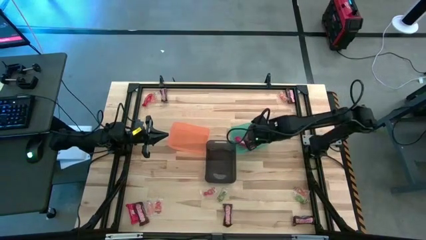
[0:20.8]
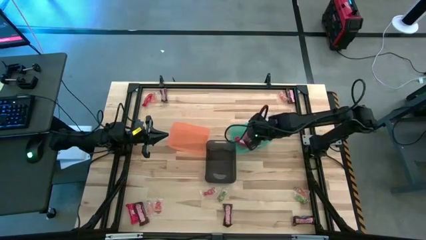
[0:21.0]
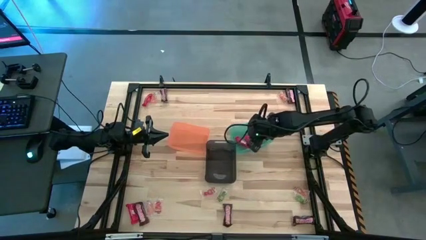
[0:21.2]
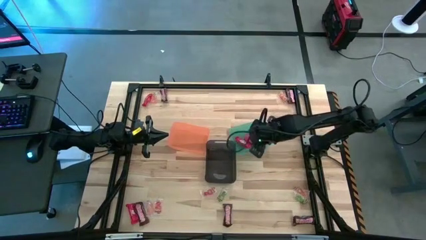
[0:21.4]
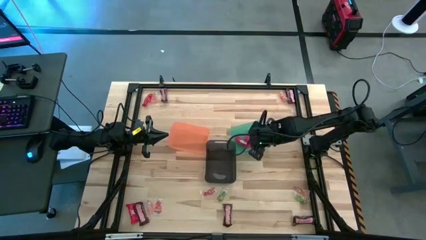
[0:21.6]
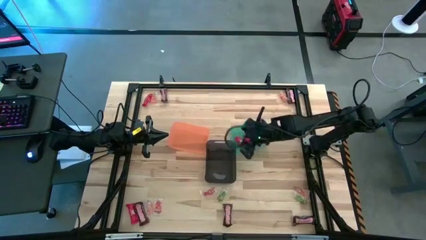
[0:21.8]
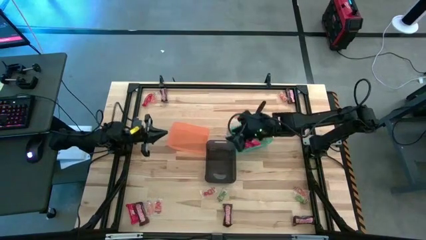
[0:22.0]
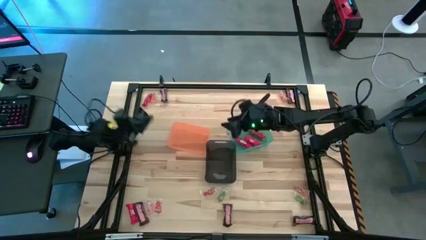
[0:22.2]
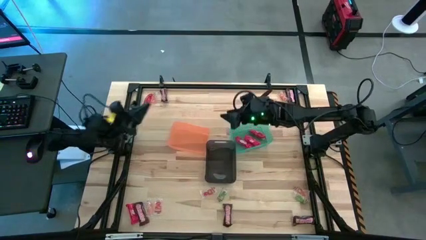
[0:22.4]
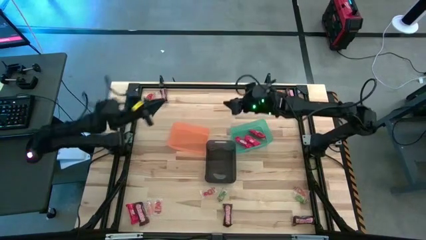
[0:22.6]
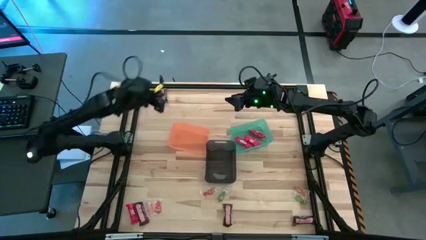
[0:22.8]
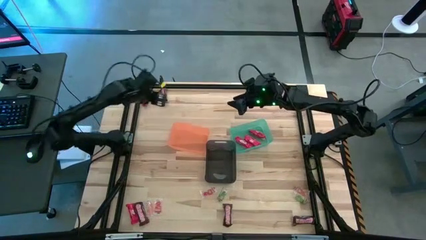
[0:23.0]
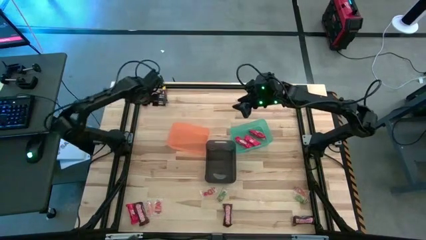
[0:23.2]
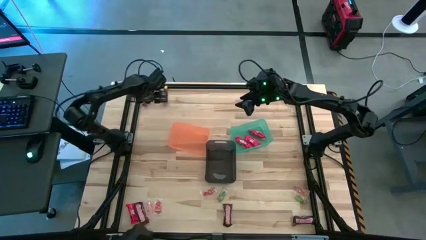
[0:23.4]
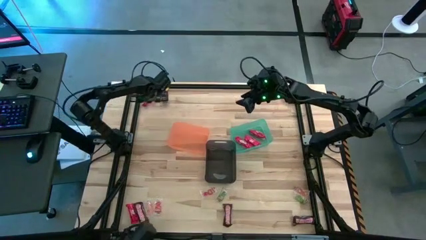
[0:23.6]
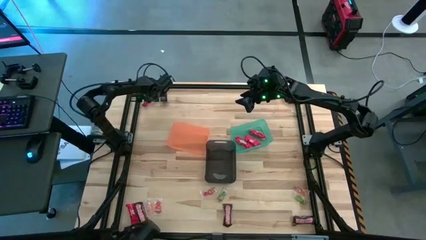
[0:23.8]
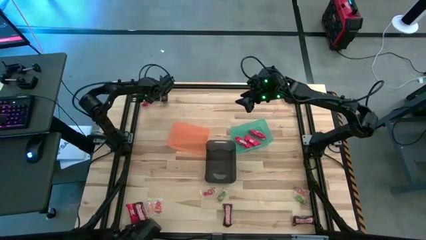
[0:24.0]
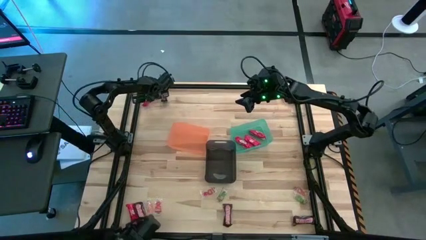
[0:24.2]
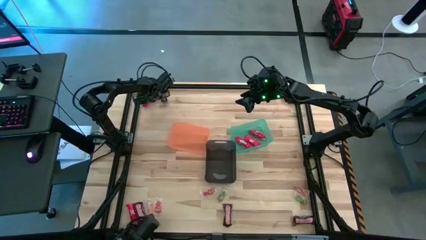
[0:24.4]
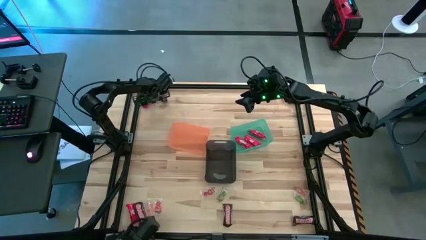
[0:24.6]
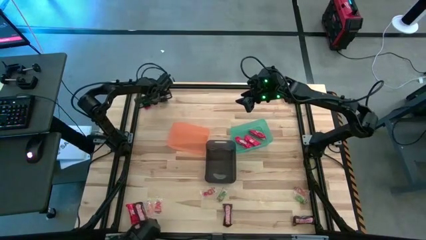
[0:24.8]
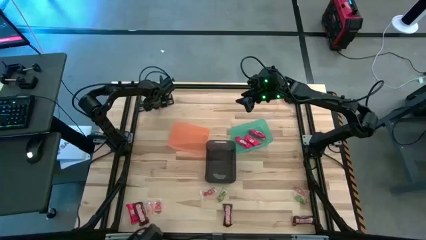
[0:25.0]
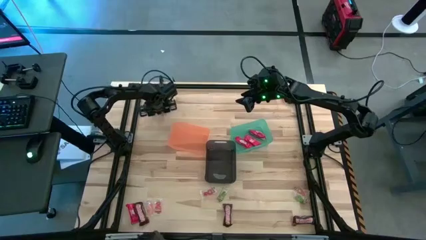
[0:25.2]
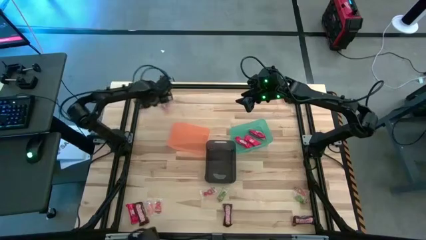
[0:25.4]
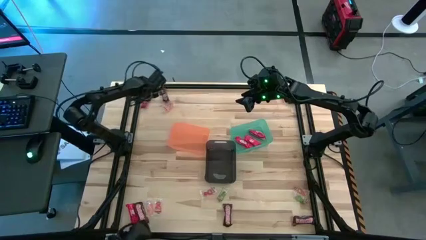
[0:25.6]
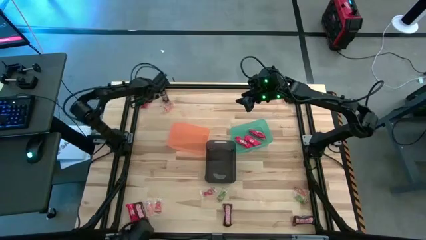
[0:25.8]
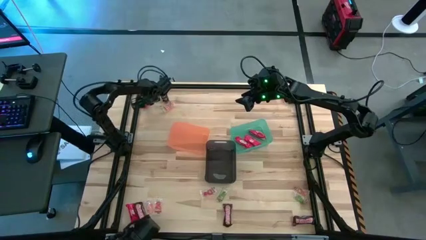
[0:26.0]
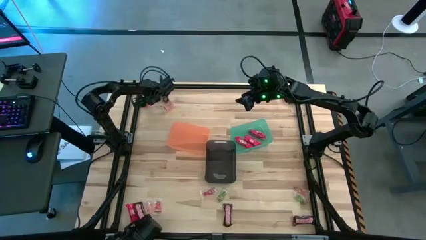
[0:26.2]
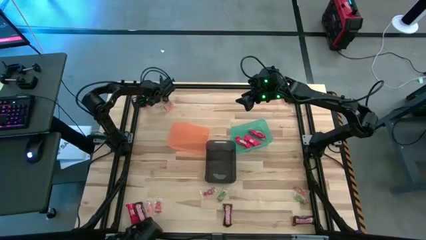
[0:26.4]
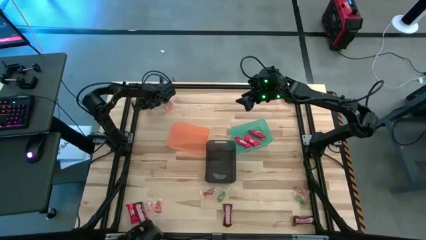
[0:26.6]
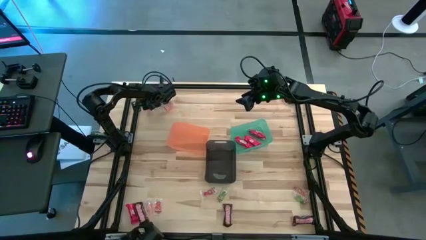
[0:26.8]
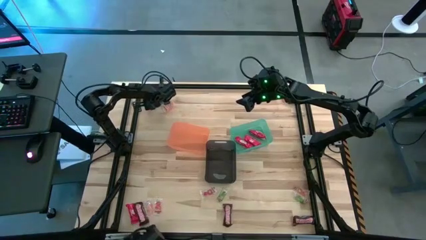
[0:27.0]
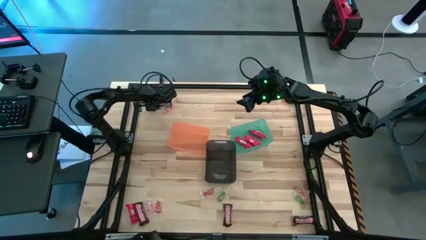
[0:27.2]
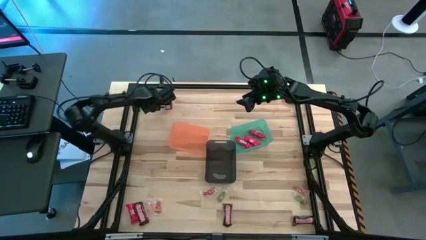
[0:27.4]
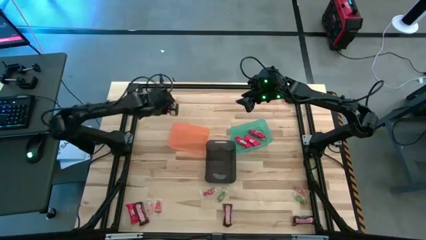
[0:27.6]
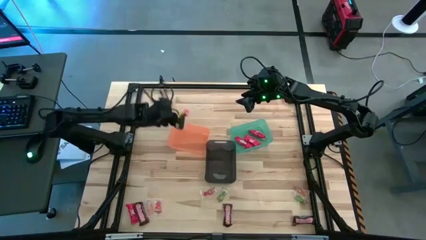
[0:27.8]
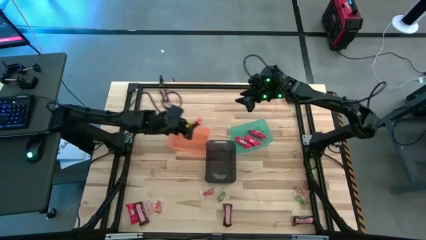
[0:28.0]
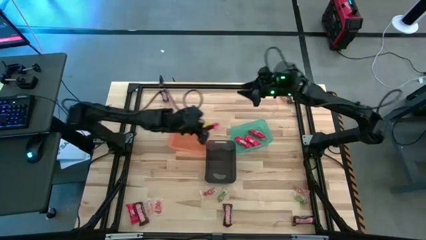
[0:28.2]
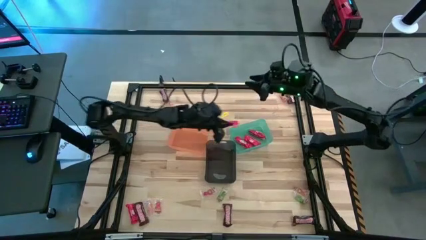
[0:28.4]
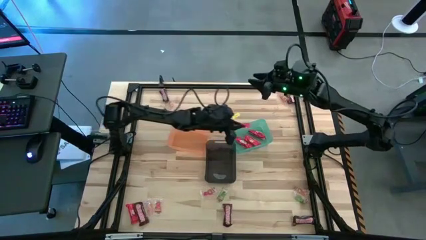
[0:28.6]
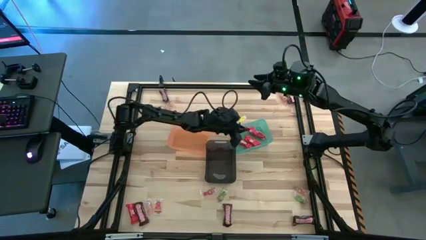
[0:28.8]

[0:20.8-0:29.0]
Task: Sort candy by brand, put in halloween buckets
Put the red chocolate bar into the green bin

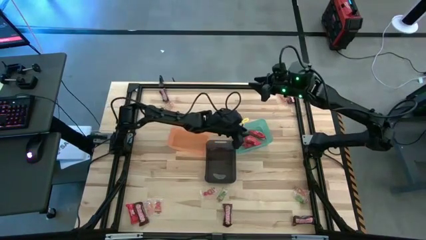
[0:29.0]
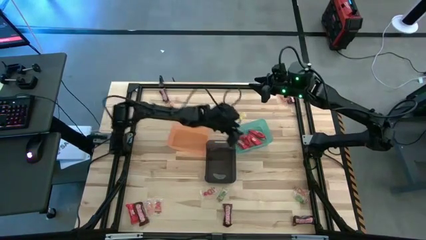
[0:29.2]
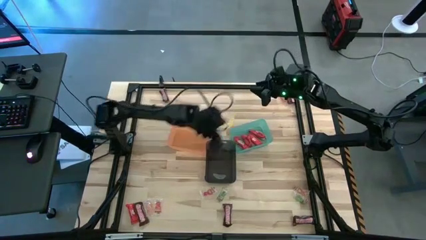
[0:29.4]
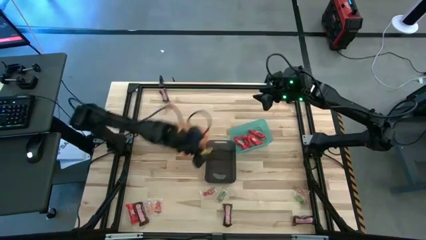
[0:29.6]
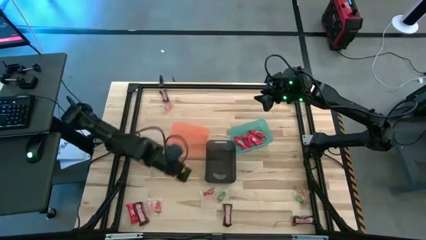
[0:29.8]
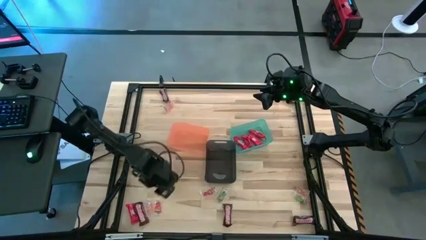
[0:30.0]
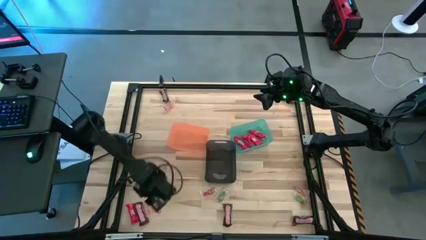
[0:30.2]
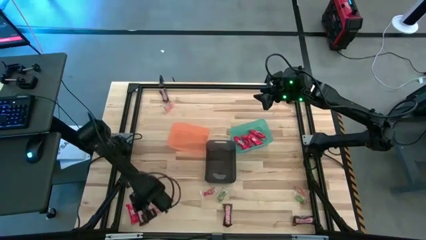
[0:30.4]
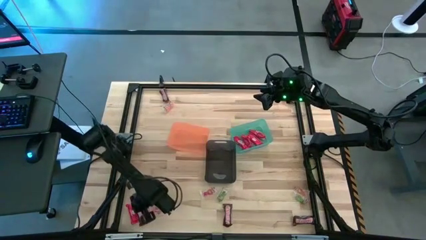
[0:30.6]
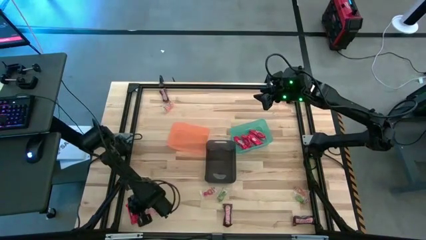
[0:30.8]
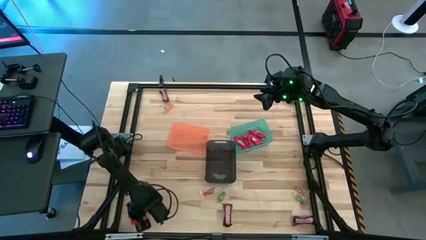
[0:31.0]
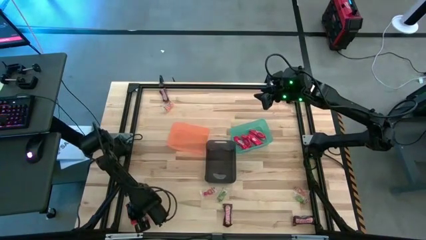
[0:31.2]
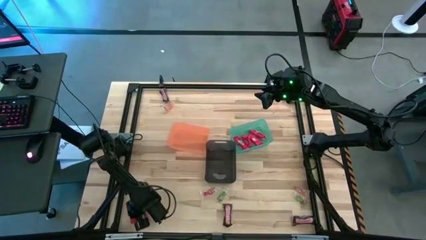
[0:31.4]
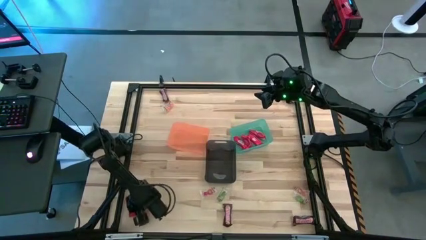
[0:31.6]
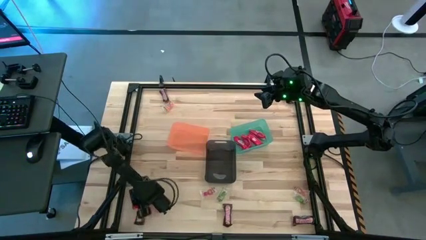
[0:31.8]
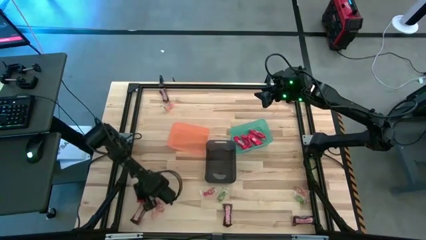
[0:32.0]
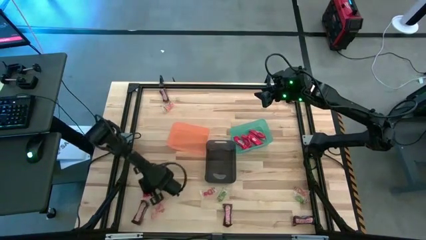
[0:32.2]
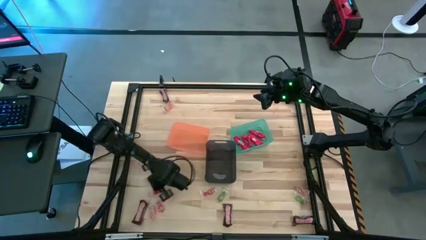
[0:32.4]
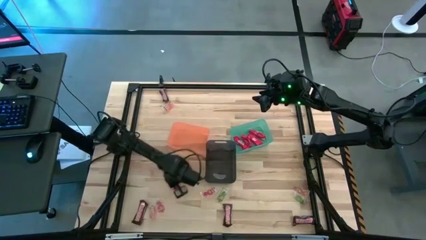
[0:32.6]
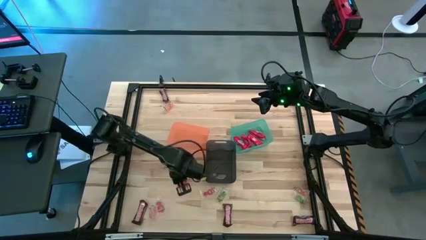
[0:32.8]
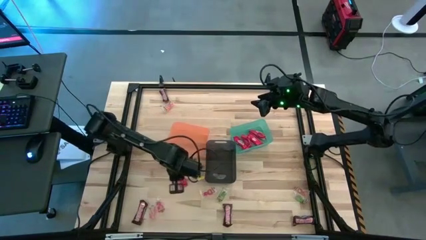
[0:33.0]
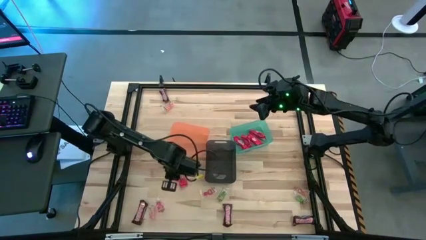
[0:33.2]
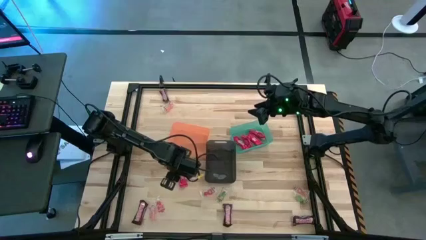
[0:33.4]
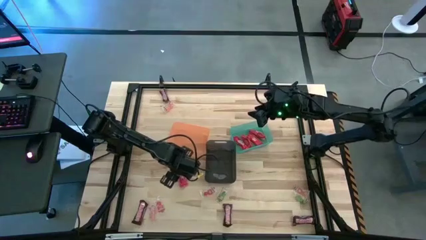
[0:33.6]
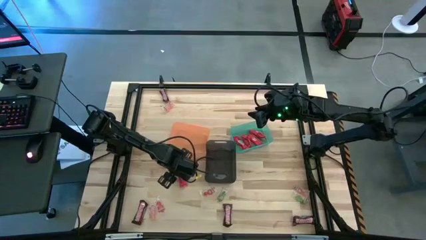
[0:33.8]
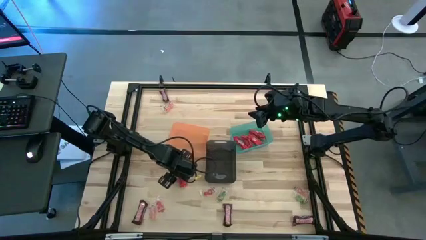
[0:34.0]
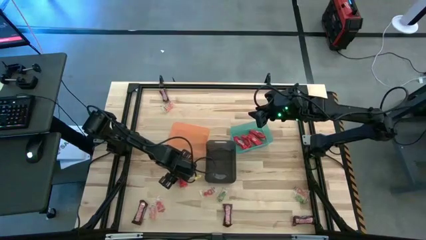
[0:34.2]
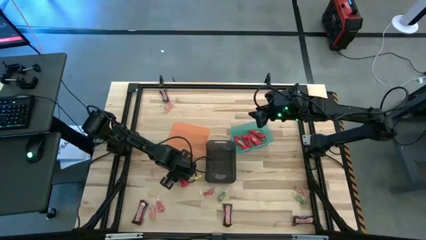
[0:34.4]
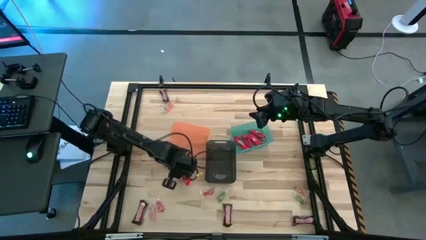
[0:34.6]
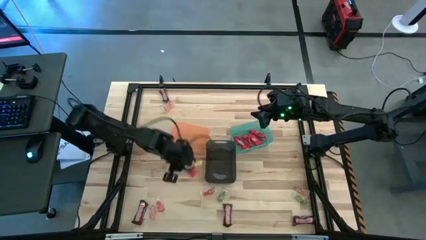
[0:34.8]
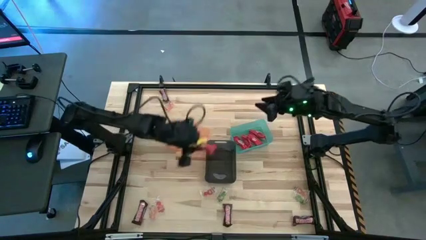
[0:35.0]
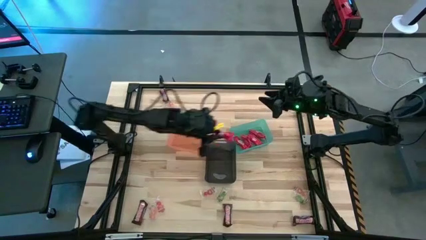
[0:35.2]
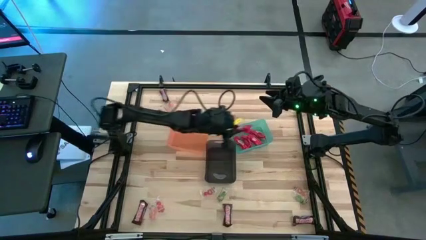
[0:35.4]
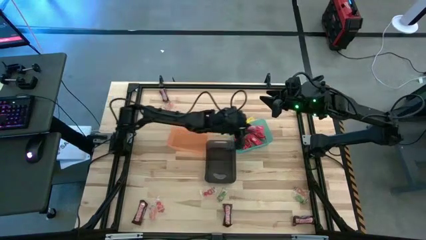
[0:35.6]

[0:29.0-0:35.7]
Put the red chocolate bar into the green bin

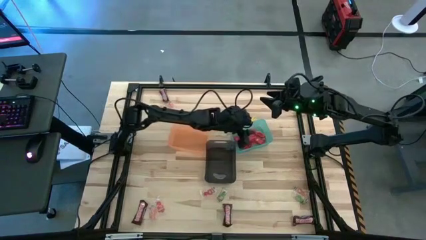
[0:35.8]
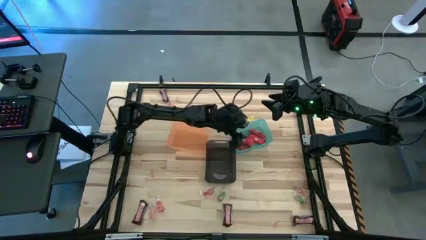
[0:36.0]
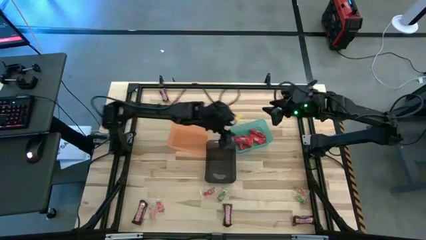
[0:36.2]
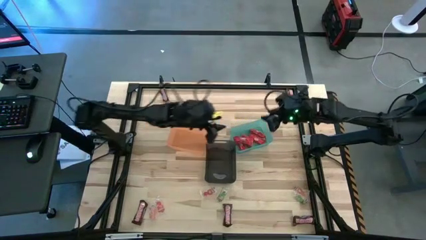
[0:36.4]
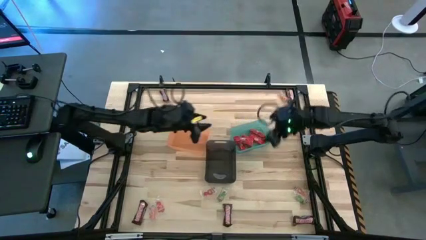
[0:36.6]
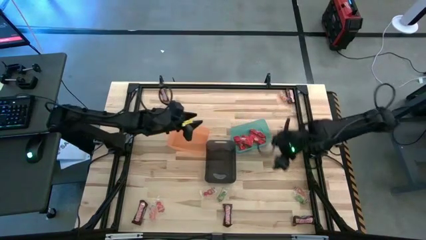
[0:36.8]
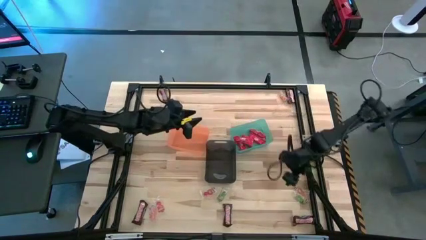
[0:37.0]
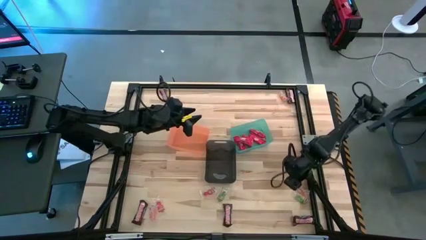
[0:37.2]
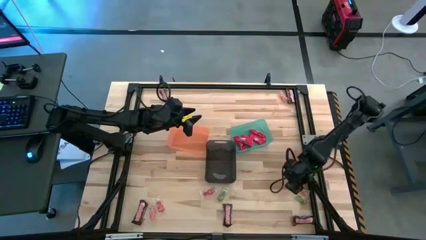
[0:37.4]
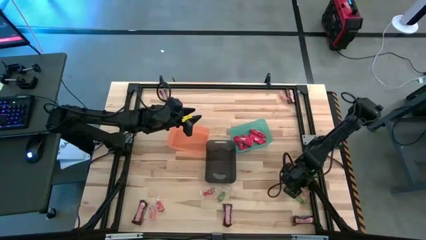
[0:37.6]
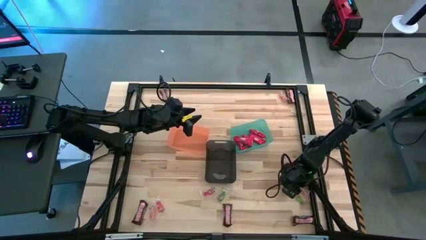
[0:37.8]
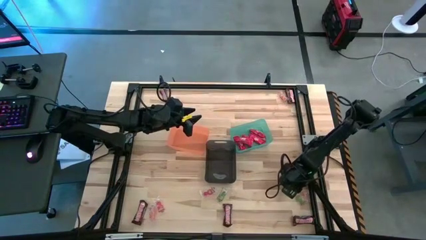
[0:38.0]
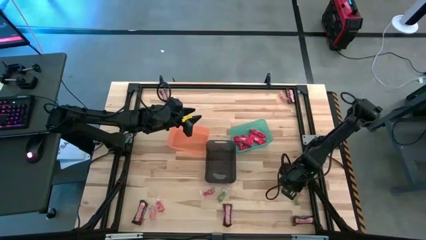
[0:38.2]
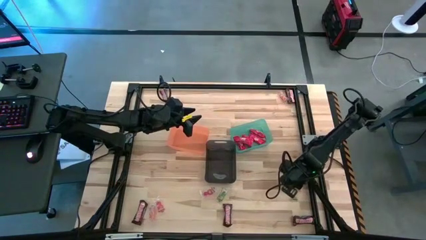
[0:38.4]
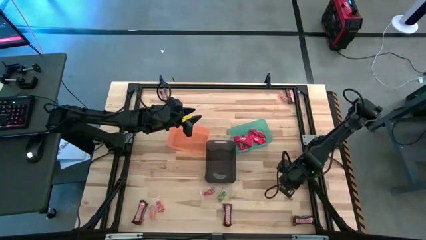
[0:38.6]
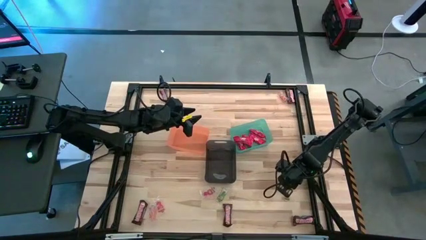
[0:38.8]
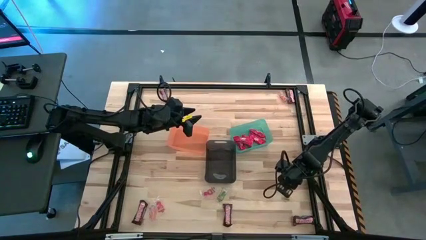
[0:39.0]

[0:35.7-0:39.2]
Put the orange gummy into the black bin
